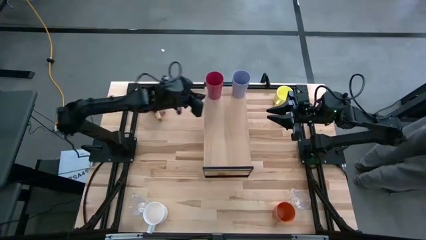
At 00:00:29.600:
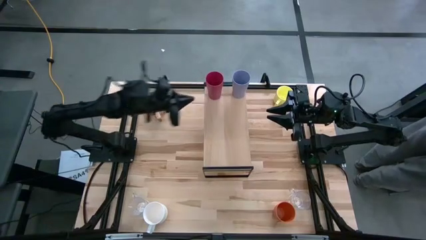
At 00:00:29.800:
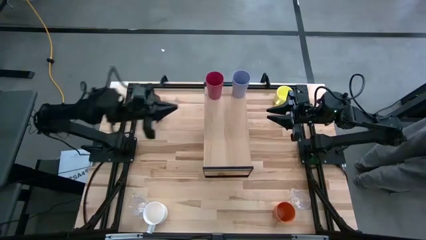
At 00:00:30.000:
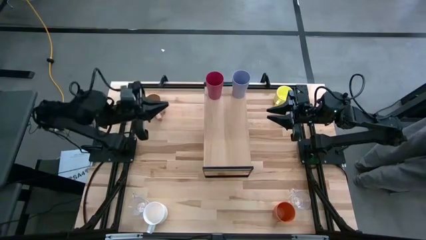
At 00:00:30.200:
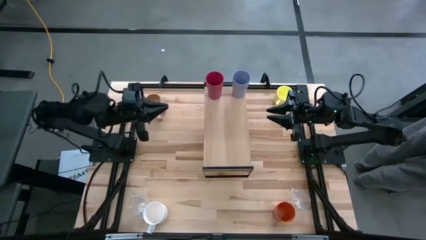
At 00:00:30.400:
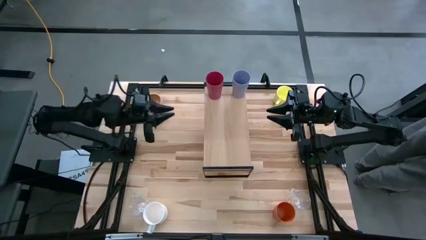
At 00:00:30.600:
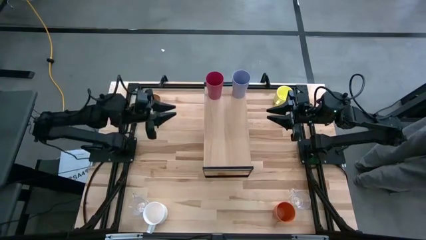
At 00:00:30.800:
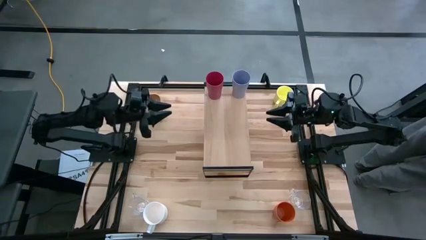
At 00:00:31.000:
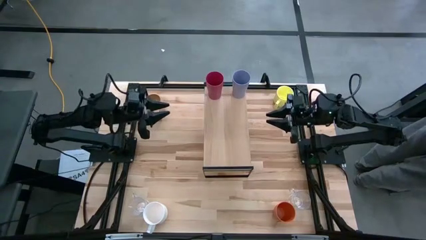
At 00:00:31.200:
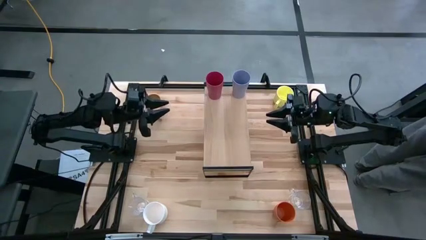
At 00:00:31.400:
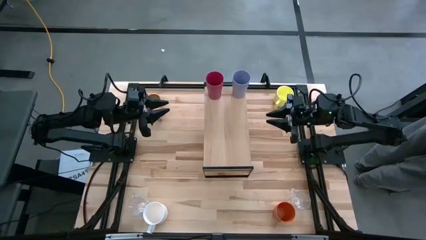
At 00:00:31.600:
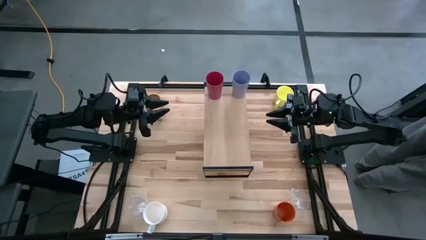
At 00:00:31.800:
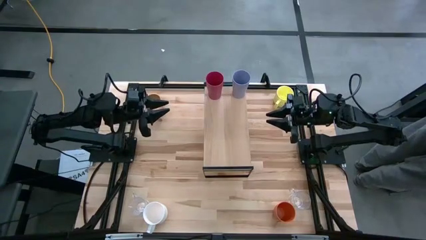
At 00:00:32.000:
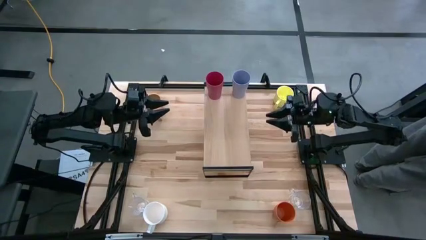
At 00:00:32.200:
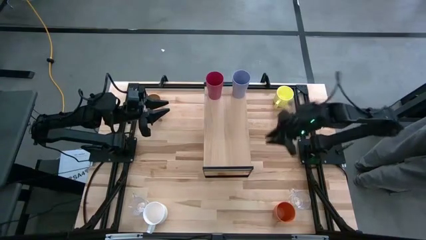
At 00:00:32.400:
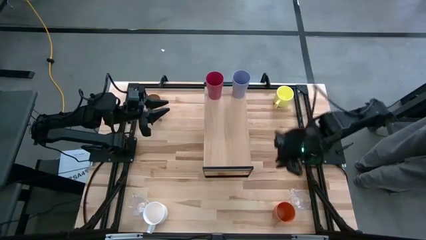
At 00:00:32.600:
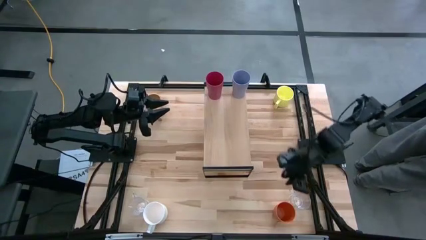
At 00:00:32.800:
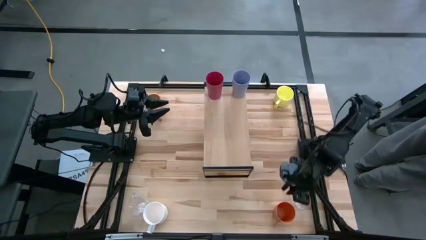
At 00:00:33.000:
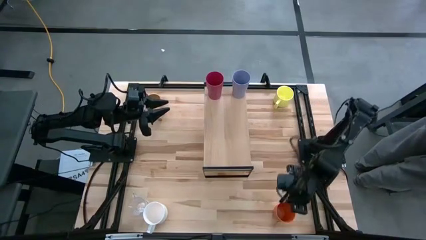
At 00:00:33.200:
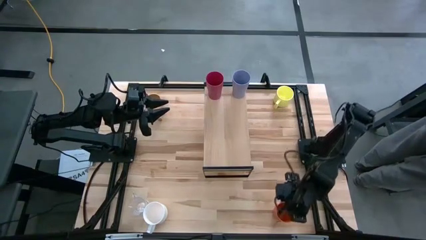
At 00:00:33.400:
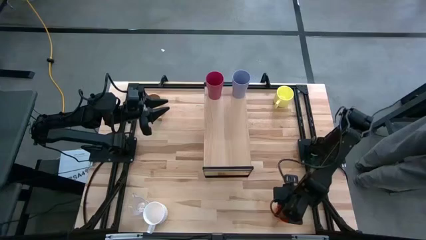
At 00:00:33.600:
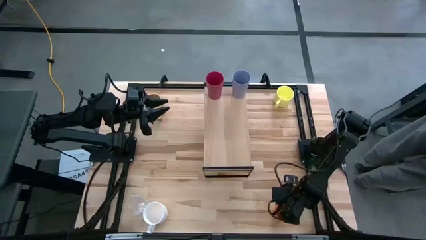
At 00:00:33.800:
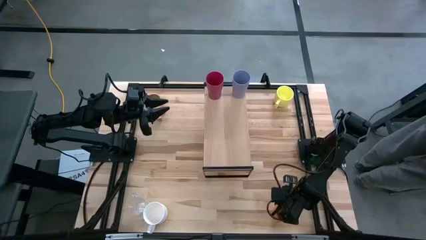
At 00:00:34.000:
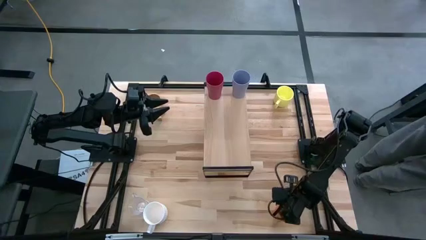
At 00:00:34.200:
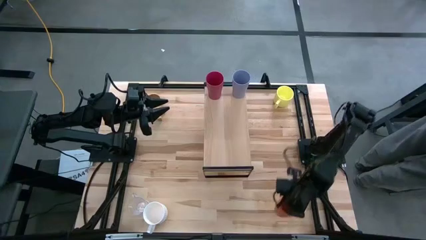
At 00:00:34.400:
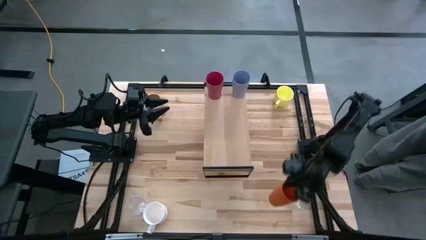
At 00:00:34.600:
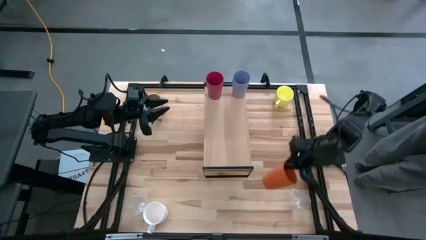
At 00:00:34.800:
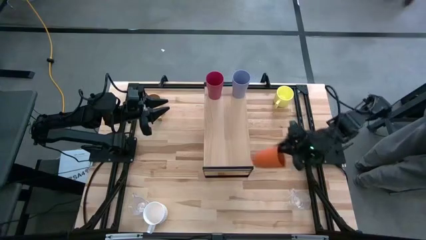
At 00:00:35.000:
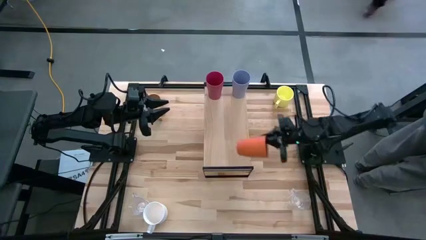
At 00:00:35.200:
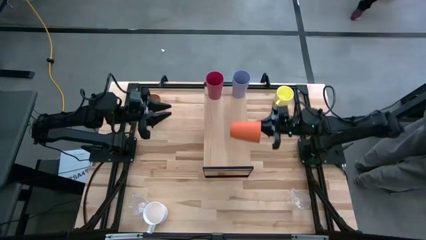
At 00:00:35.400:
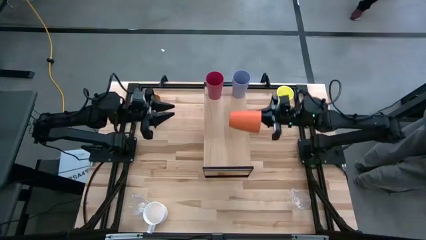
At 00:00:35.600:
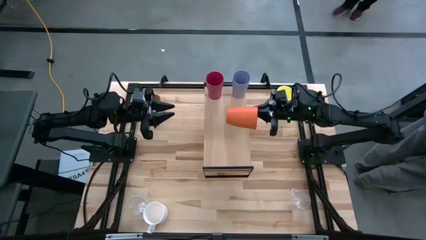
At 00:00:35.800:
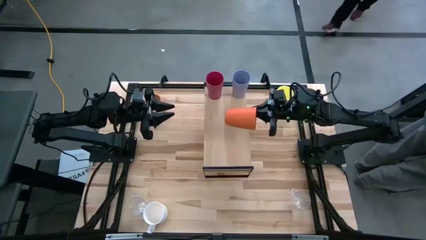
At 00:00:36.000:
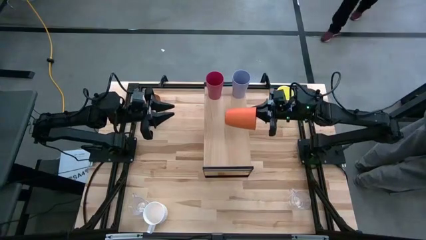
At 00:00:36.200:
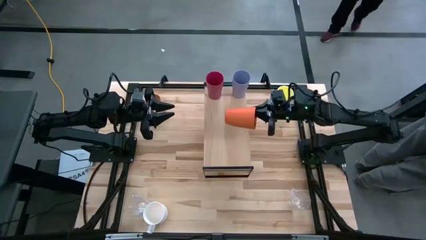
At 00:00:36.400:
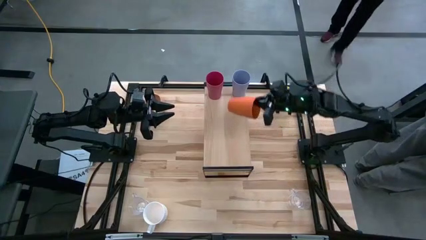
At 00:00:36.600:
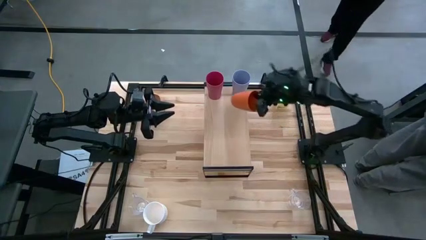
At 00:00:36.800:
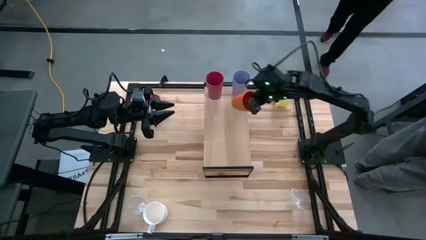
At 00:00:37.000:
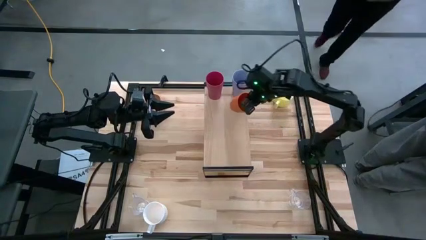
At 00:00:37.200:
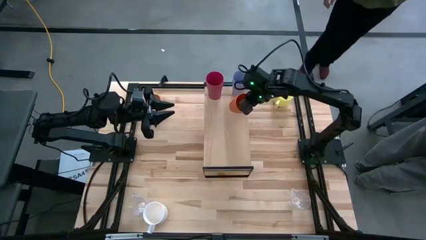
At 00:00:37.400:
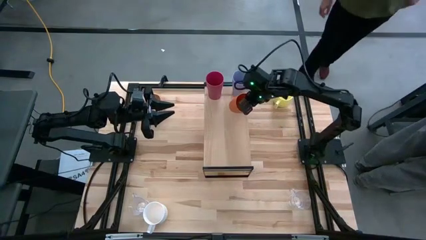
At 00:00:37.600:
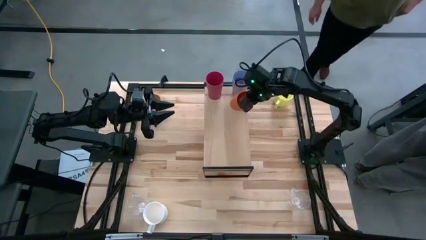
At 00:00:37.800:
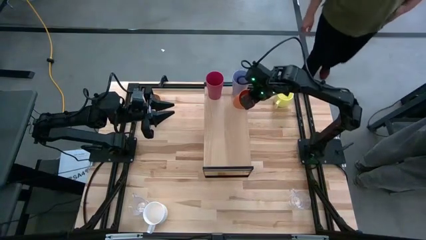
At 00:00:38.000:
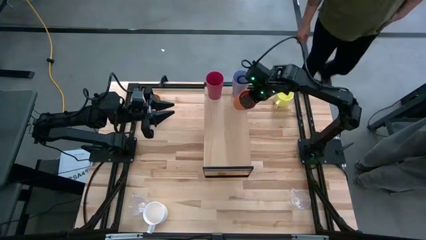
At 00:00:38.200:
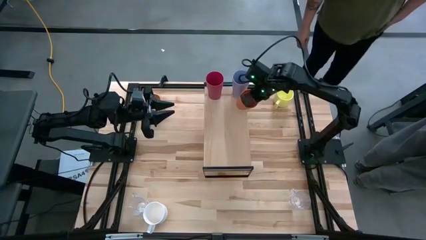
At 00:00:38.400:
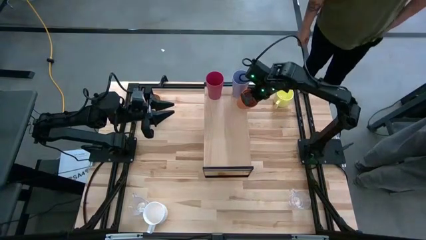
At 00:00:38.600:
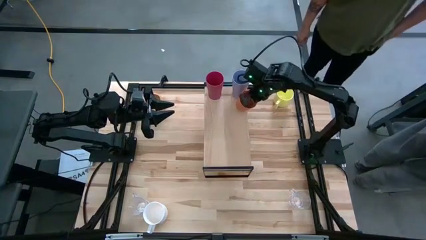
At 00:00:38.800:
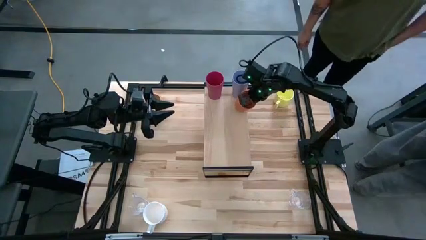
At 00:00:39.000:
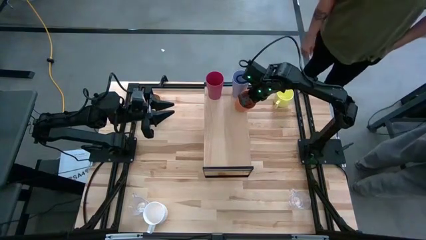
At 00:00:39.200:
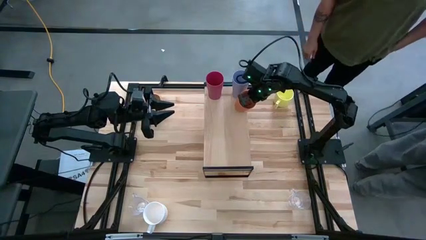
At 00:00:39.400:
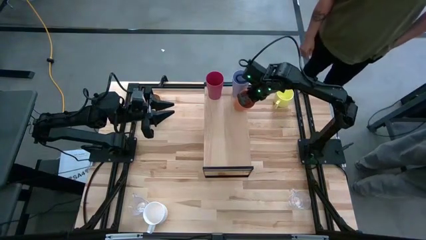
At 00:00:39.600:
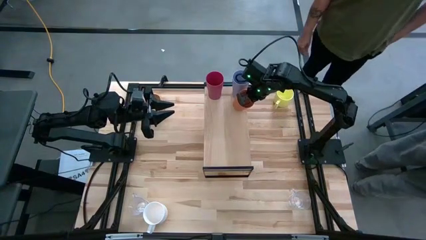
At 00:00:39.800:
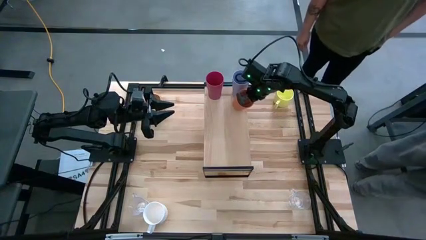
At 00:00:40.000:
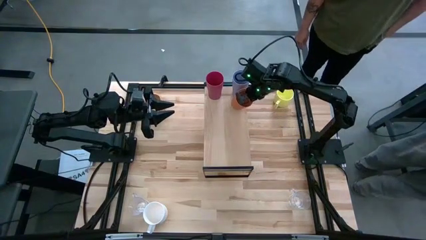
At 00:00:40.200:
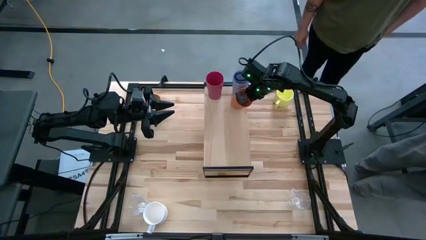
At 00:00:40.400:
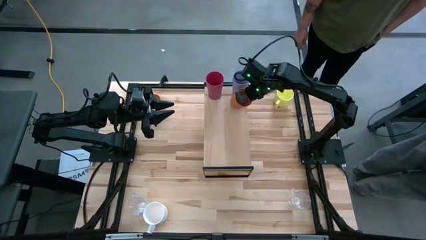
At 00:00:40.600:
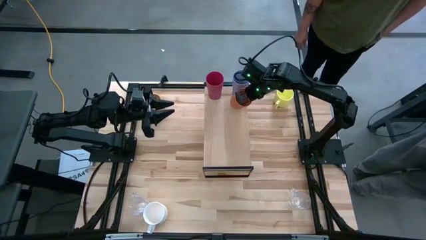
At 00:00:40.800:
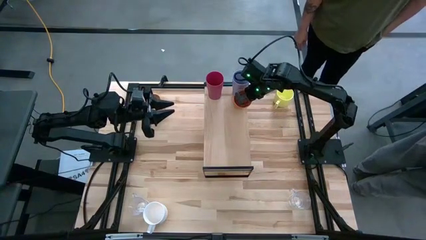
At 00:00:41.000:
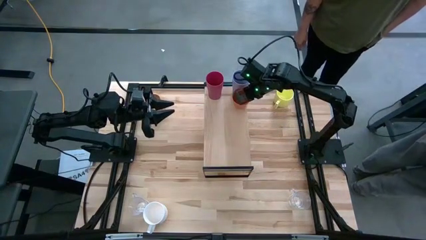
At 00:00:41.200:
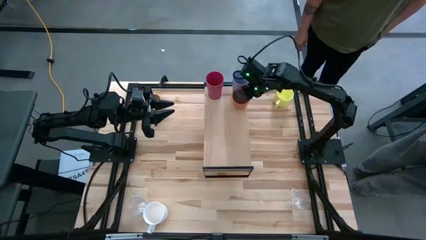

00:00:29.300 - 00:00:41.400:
Task: Stack small to large cups/mugs on shelf
Put the orange cup on the shelf
